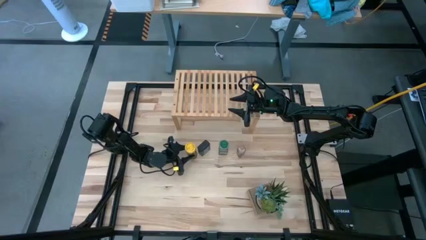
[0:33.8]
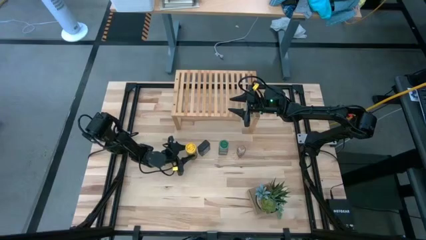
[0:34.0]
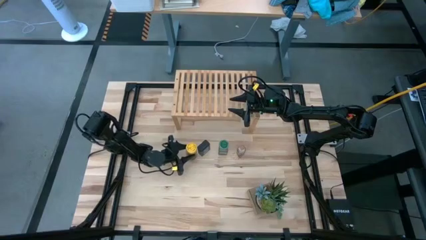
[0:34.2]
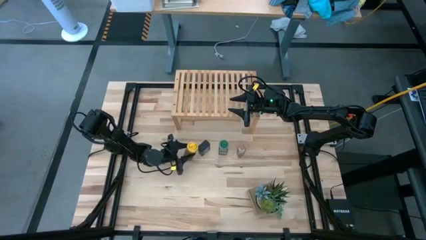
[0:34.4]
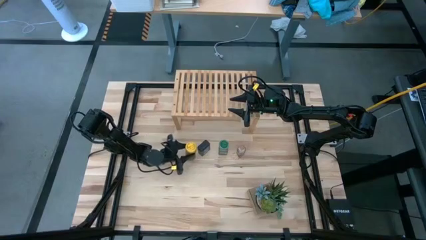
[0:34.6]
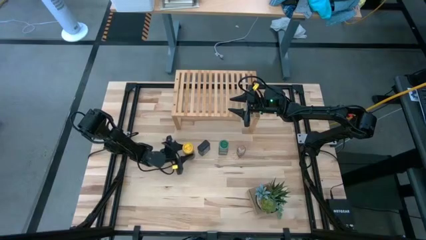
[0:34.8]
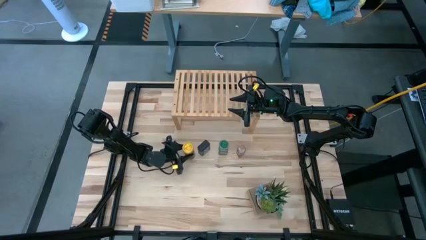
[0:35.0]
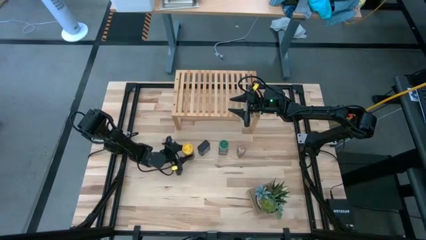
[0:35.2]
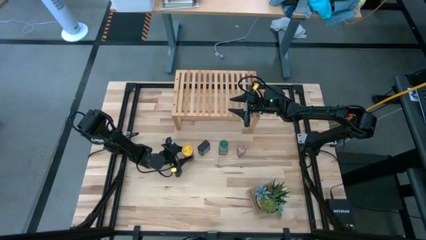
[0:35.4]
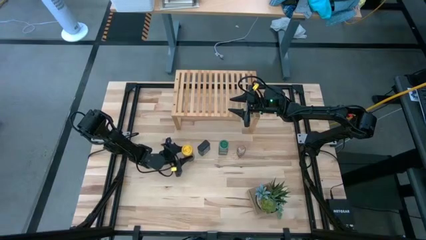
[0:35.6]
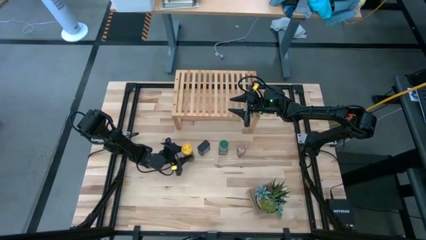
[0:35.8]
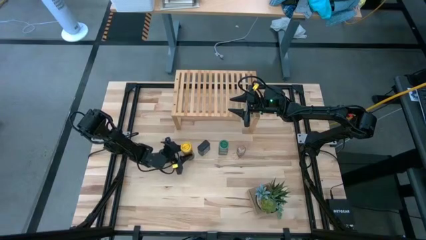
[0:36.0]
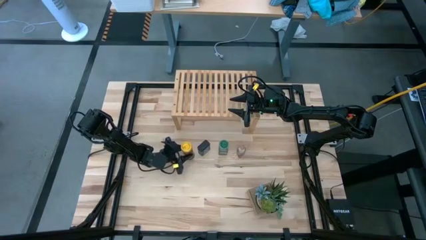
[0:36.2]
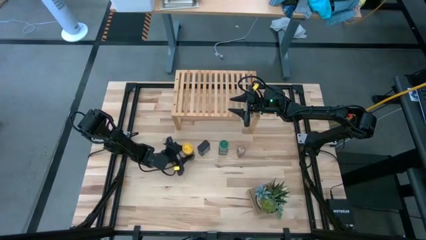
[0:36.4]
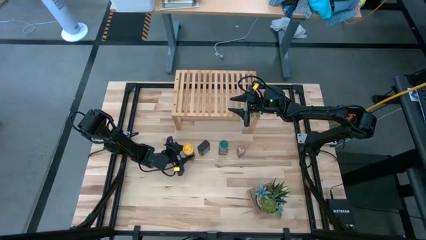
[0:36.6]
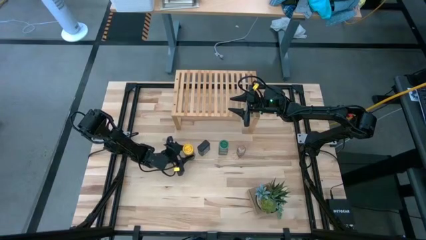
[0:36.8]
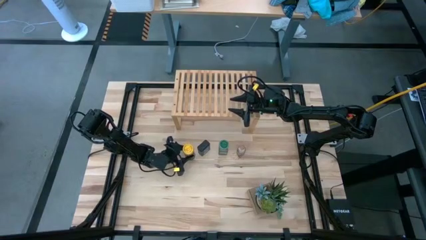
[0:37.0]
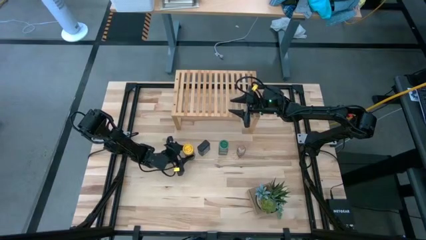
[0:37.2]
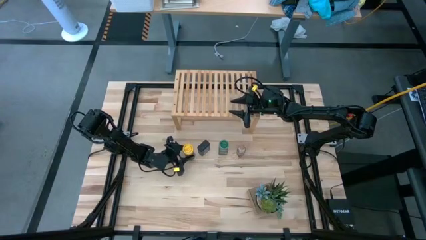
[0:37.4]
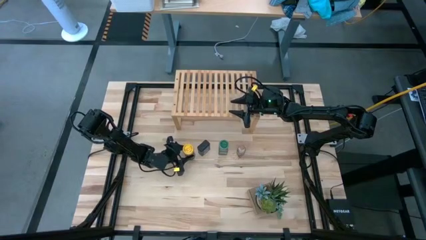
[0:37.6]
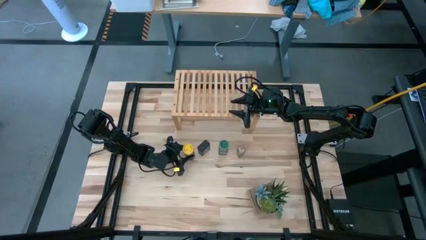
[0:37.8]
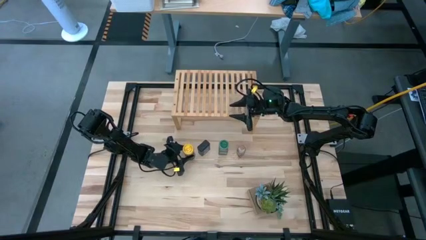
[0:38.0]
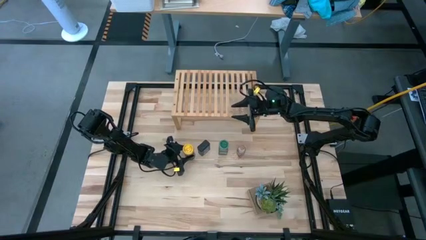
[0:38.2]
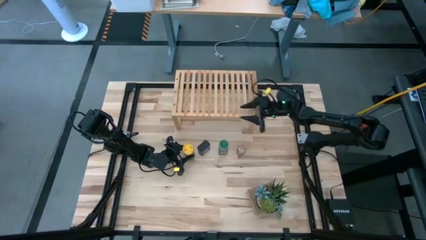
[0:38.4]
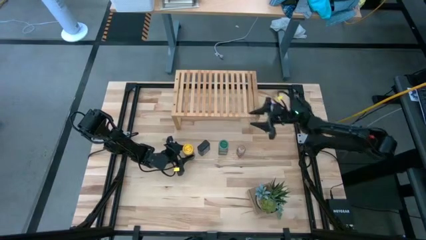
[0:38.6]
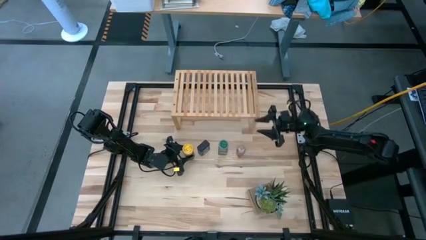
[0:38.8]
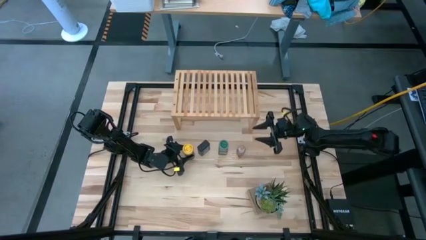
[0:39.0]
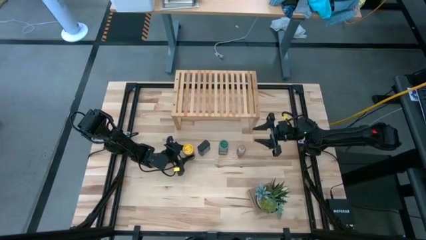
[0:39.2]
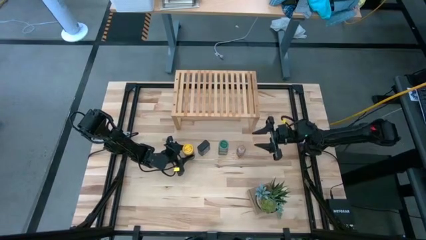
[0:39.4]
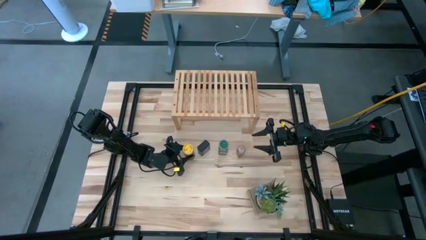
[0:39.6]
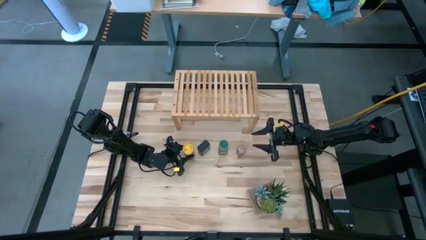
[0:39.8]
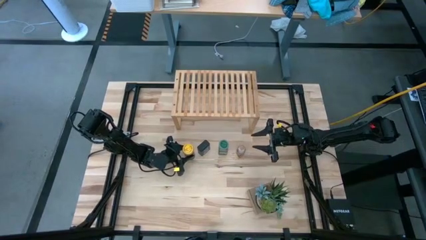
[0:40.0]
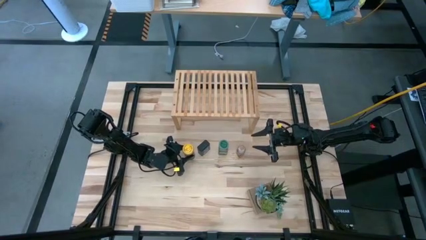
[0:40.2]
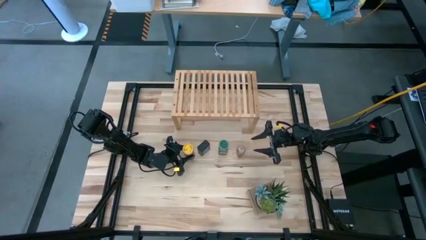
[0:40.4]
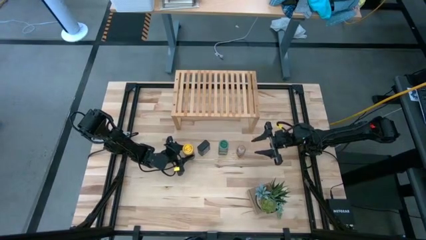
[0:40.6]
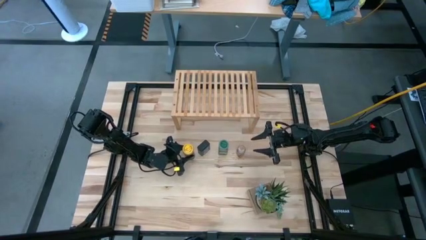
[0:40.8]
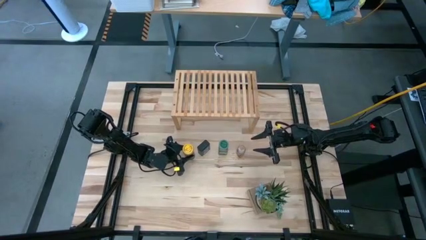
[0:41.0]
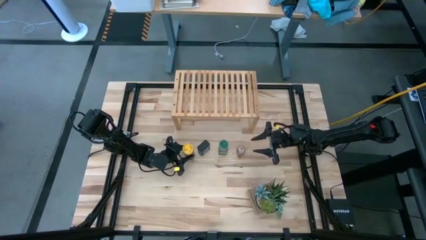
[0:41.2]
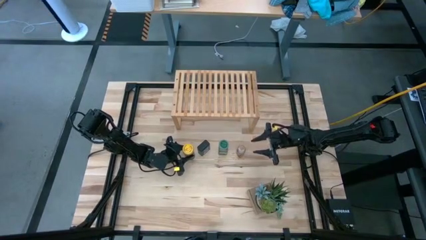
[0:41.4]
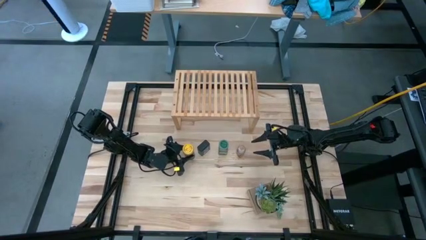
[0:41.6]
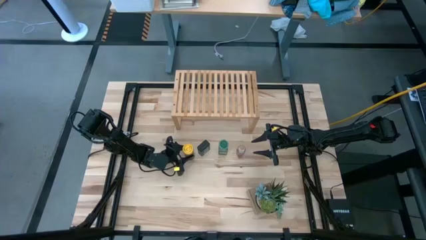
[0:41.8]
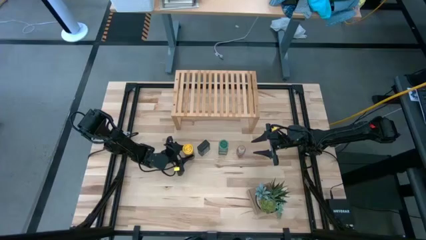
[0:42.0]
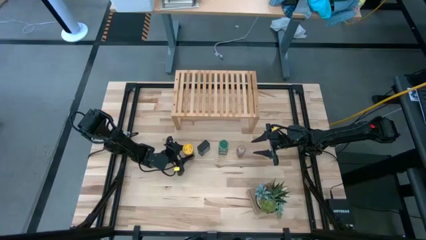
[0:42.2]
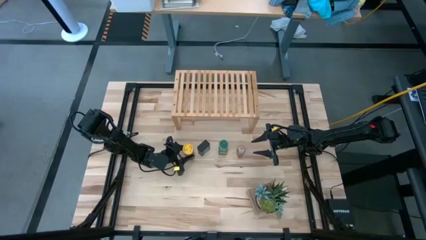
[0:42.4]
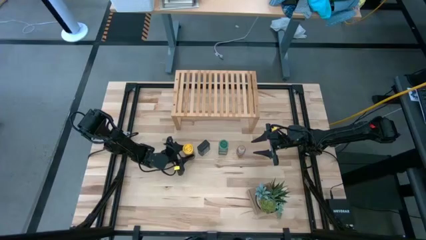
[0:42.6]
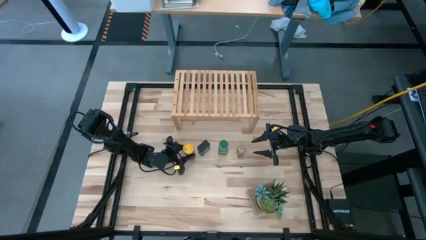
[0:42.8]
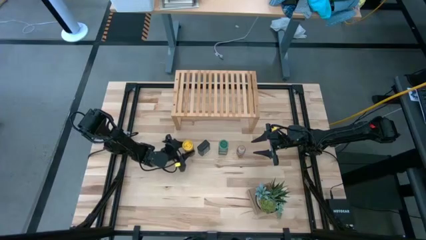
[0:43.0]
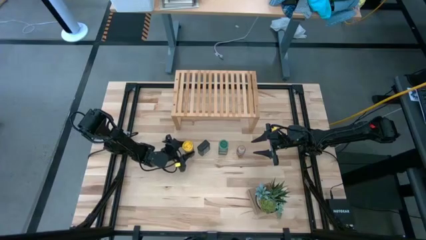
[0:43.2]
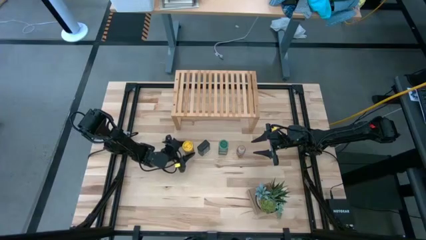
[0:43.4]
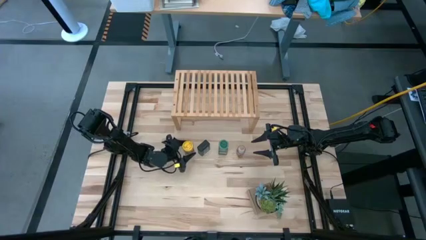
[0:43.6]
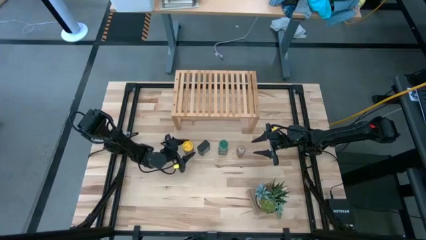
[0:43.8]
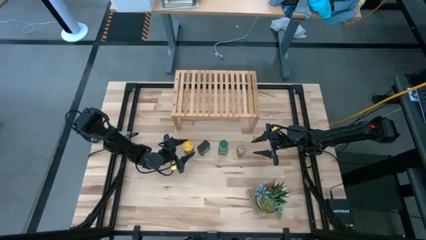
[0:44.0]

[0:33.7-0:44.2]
Task: Shelf spices
Remove the yellow seasoning from the shelf

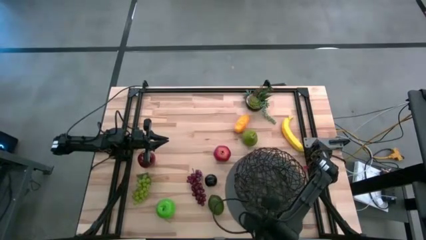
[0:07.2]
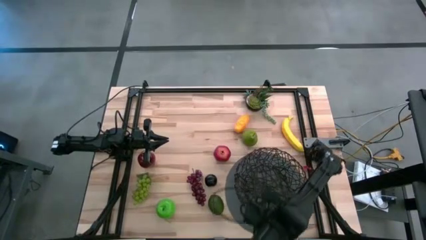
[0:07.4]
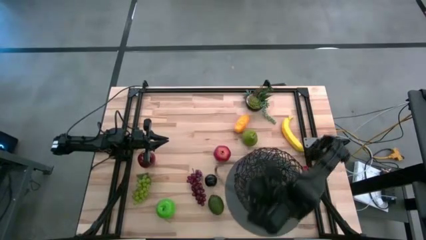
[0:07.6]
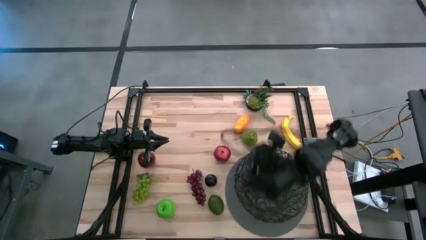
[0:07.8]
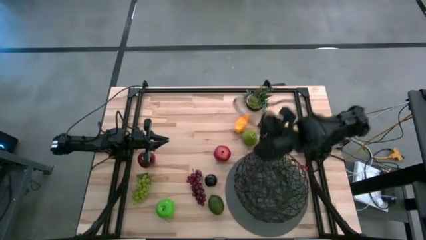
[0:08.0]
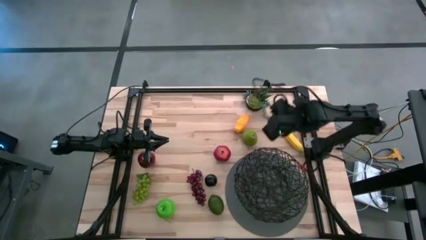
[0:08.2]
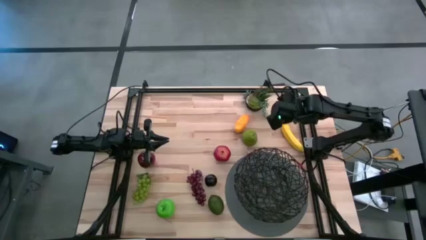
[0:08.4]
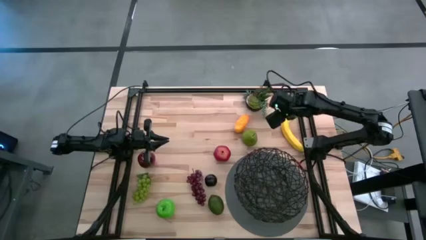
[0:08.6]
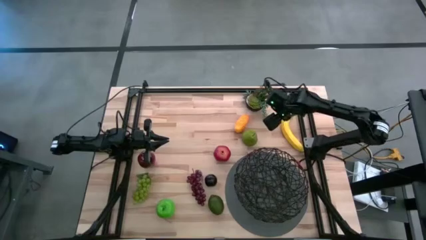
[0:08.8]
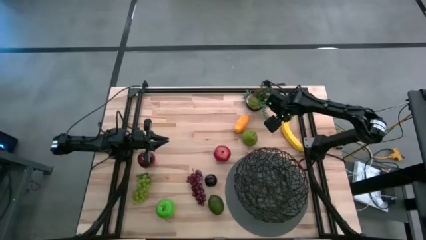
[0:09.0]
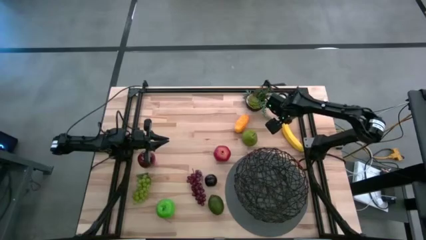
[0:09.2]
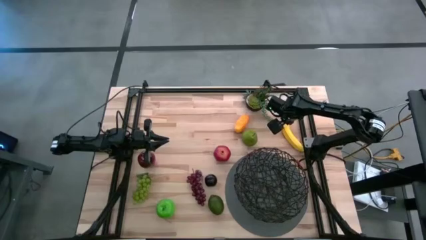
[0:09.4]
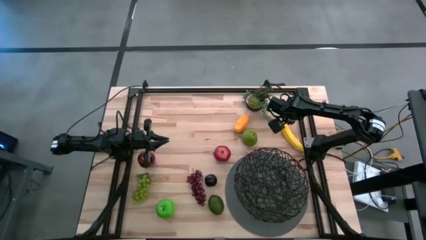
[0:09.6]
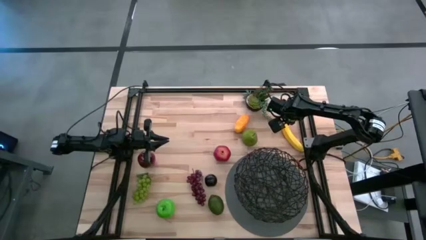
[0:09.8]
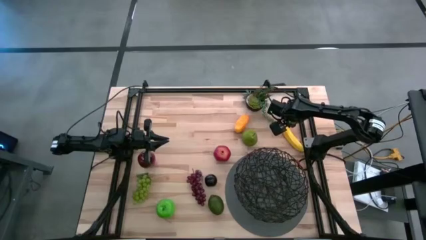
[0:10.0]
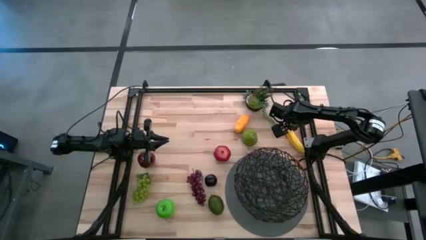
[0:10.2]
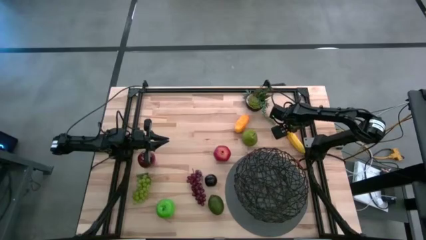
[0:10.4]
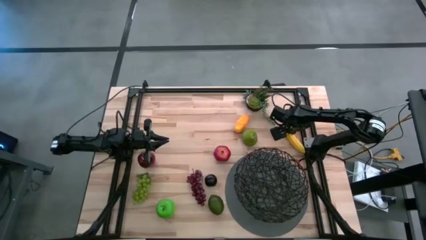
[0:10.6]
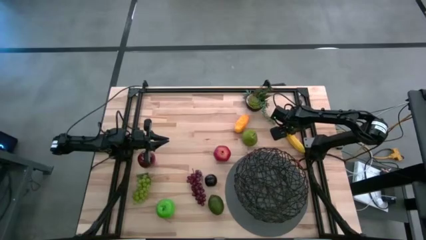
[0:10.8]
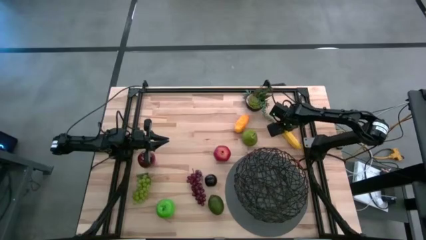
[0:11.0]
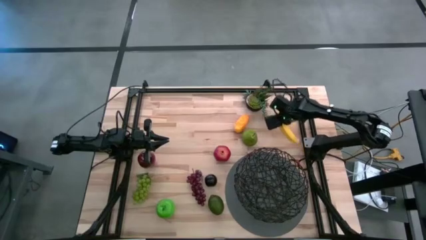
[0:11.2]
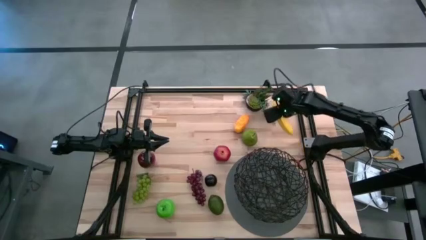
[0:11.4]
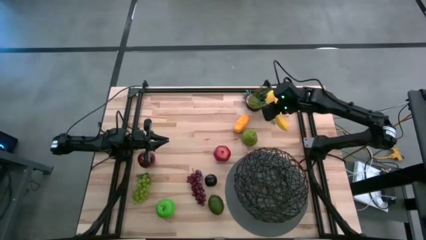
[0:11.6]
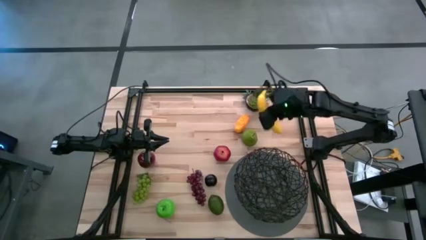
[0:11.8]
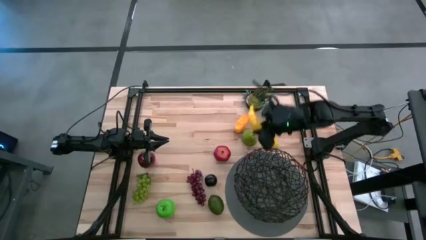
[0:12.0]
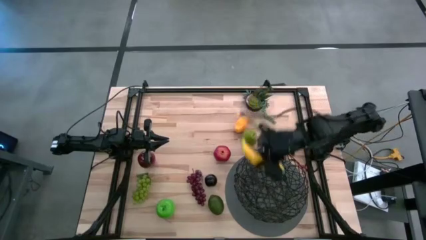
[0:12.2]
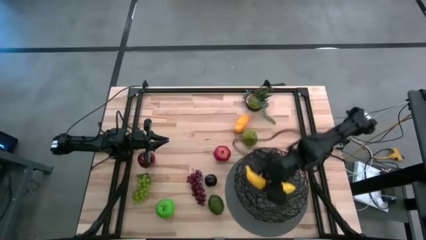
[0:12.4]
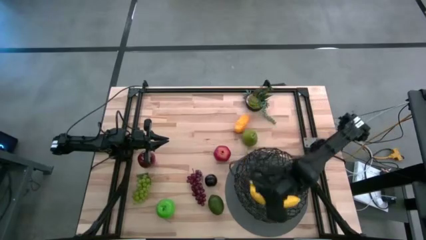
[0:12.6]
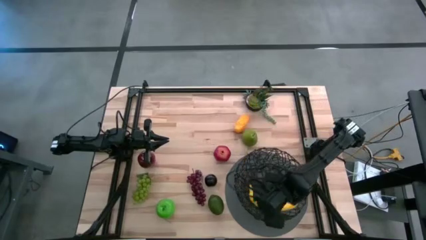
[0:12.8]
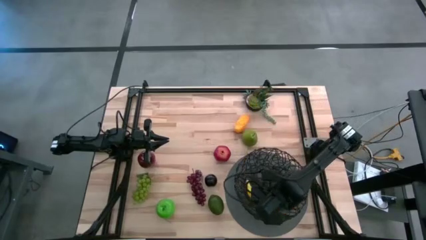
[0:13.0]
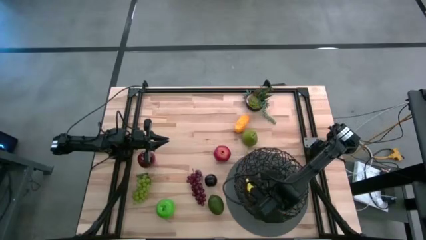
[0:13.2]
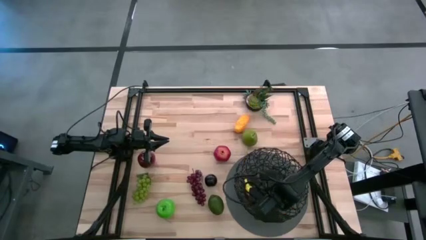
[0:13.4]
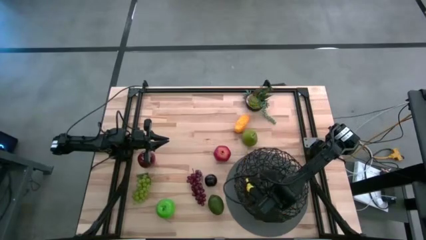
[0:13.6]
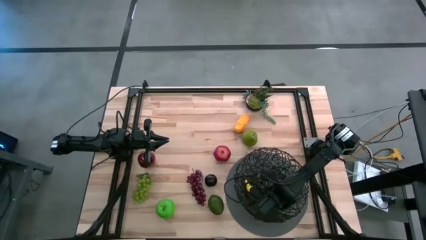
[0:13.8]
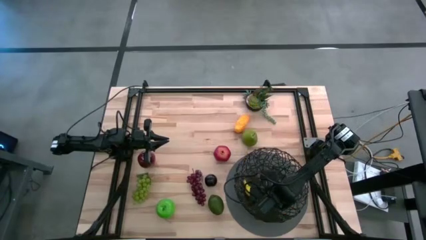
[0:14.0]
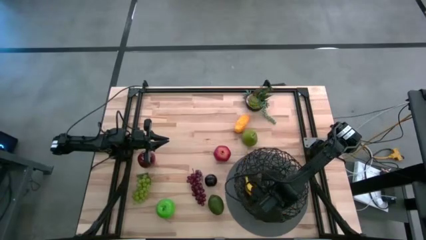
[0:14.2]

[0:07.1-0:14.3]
Task: Build produce basket
Put the banana into the black wire basket
